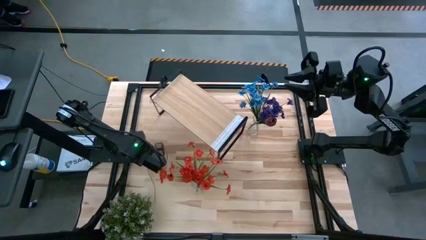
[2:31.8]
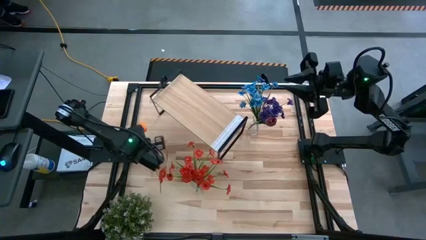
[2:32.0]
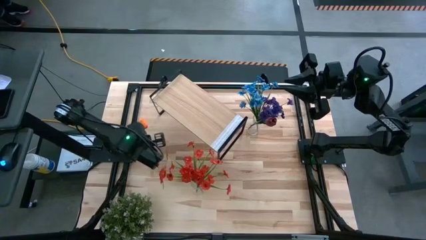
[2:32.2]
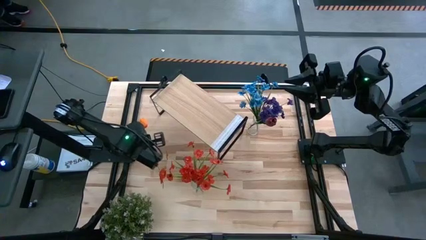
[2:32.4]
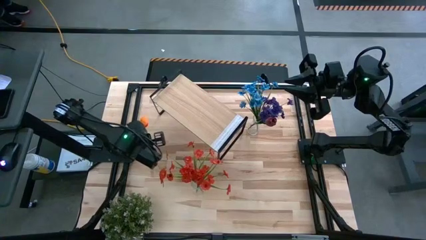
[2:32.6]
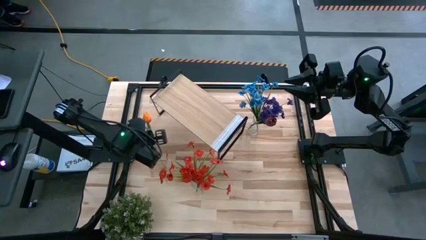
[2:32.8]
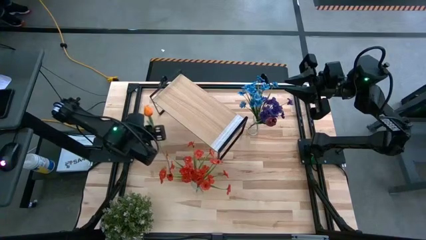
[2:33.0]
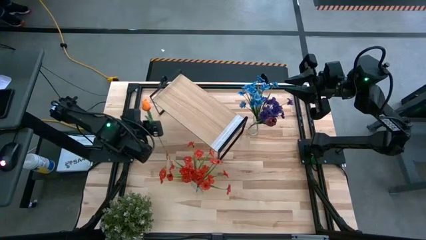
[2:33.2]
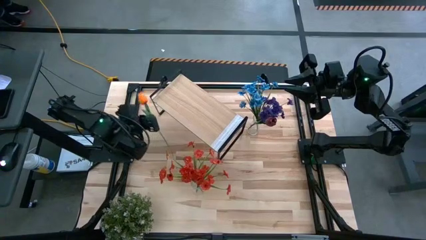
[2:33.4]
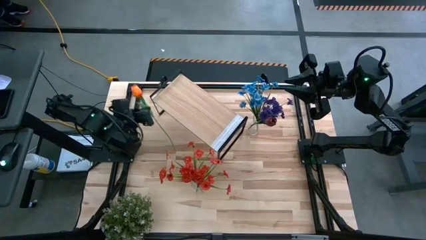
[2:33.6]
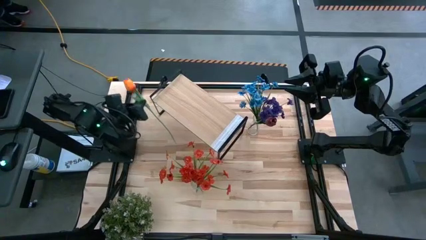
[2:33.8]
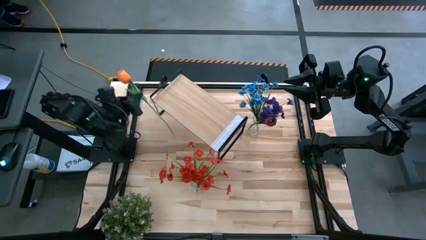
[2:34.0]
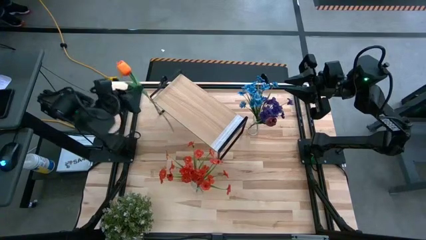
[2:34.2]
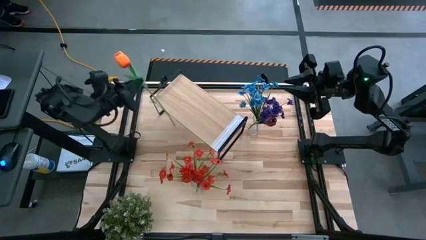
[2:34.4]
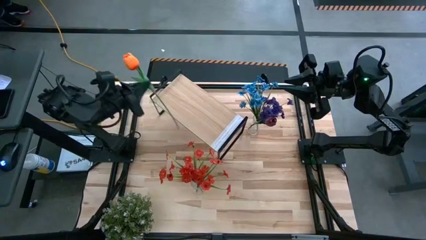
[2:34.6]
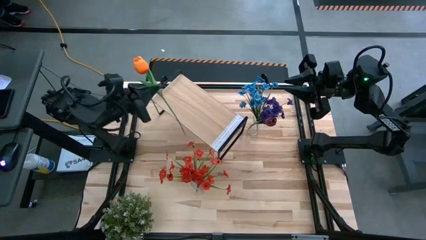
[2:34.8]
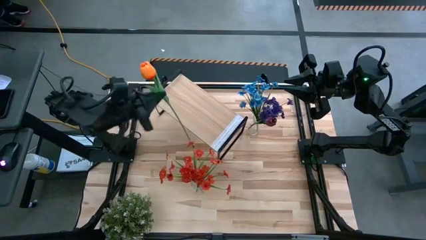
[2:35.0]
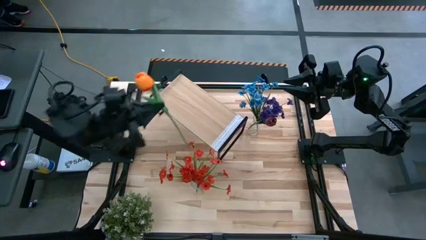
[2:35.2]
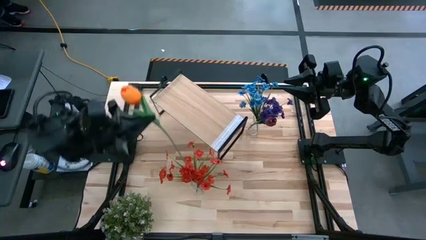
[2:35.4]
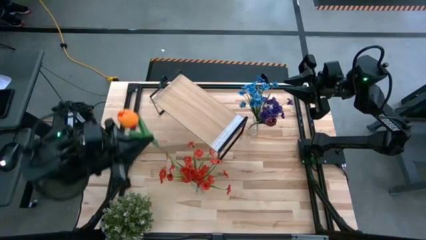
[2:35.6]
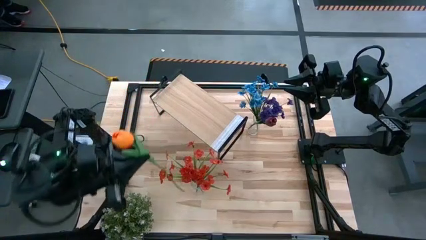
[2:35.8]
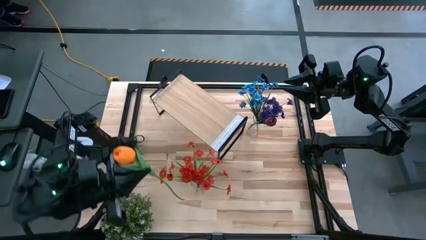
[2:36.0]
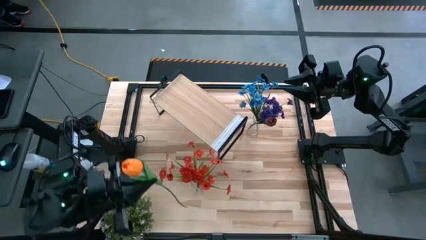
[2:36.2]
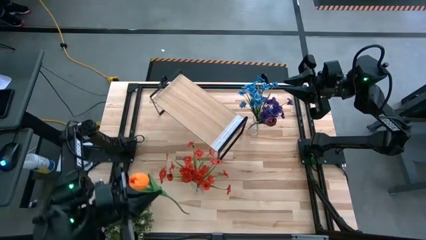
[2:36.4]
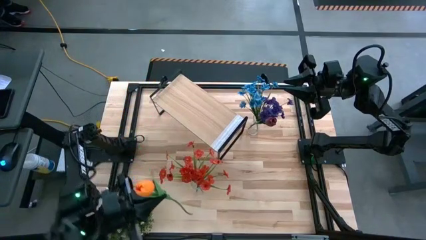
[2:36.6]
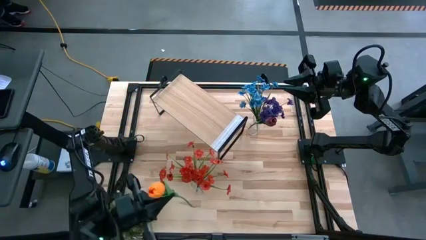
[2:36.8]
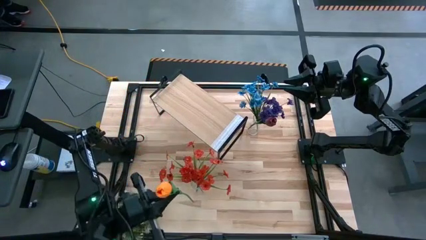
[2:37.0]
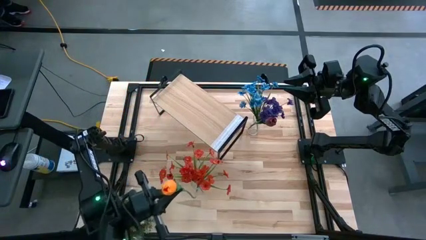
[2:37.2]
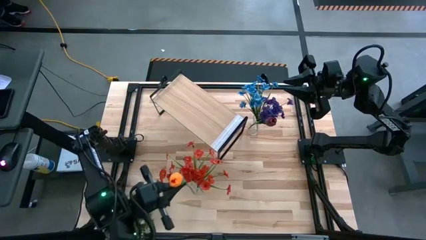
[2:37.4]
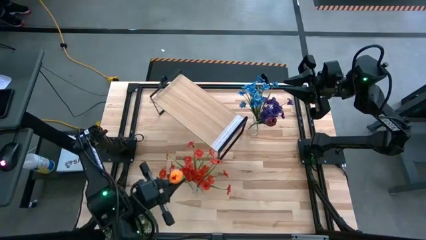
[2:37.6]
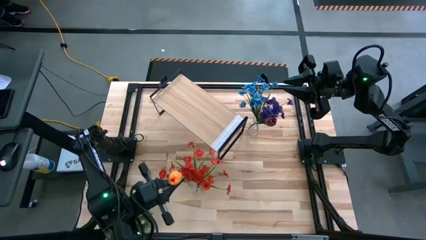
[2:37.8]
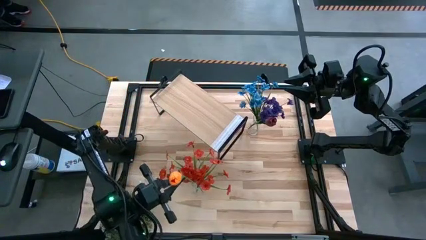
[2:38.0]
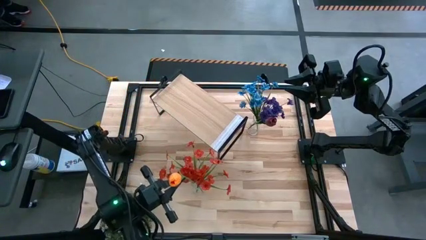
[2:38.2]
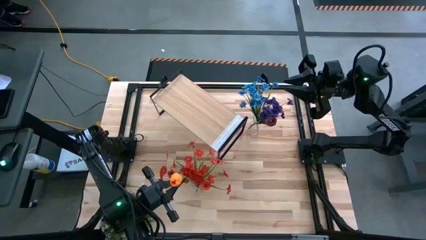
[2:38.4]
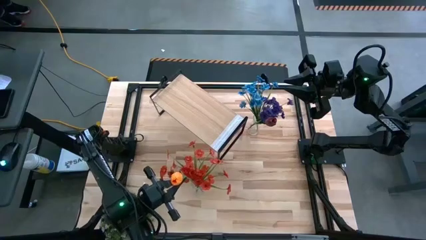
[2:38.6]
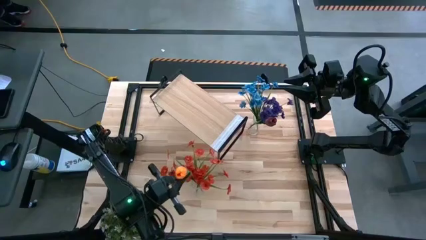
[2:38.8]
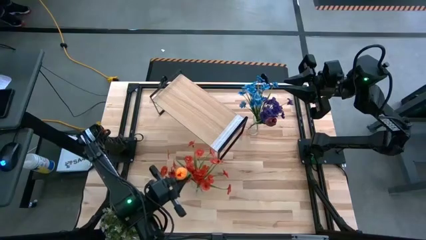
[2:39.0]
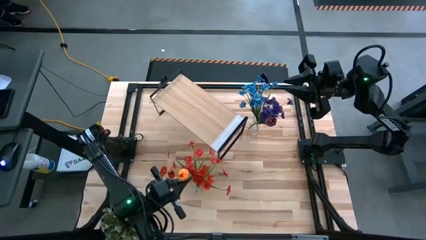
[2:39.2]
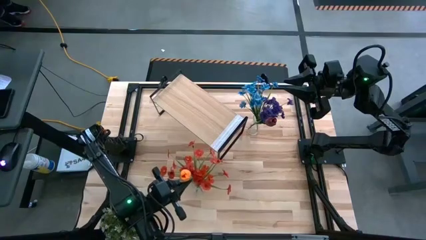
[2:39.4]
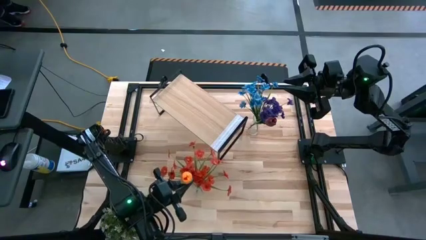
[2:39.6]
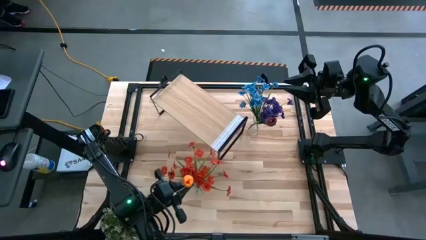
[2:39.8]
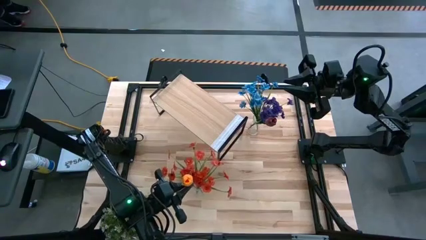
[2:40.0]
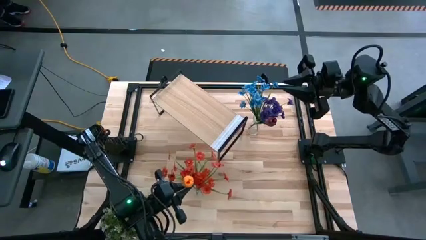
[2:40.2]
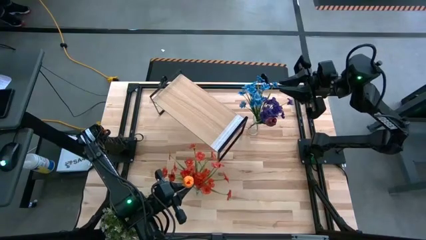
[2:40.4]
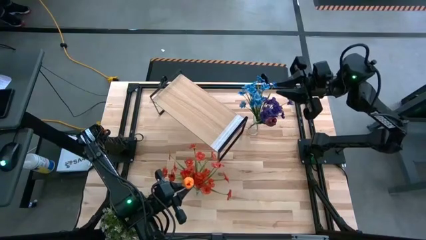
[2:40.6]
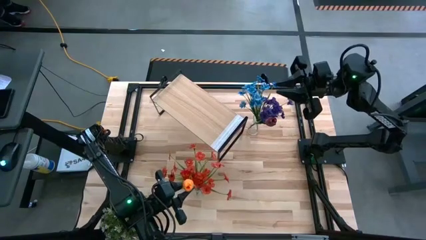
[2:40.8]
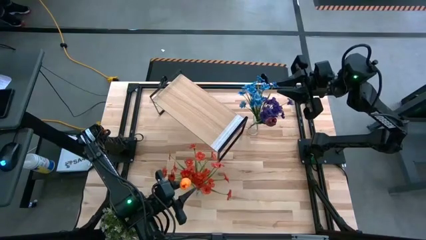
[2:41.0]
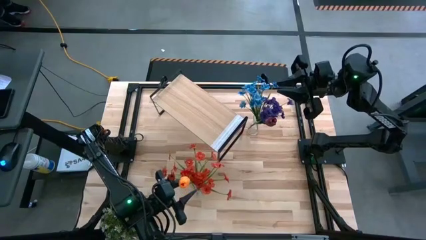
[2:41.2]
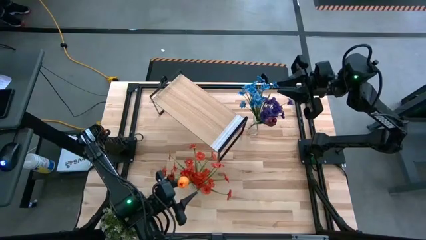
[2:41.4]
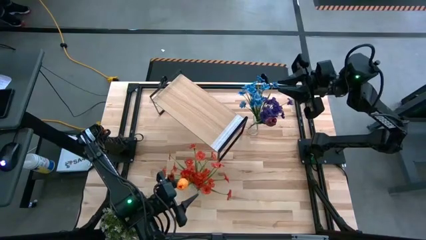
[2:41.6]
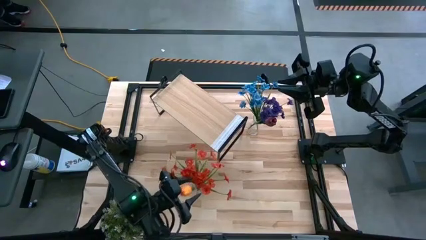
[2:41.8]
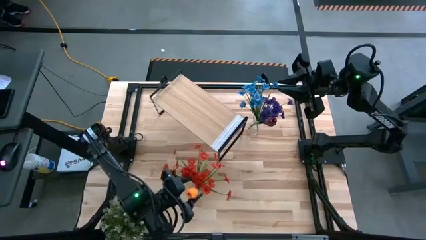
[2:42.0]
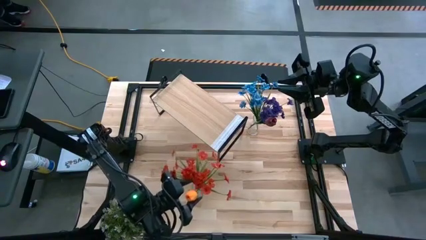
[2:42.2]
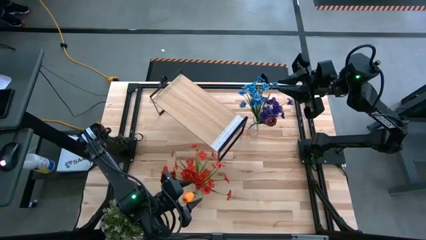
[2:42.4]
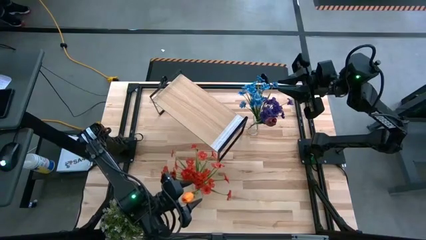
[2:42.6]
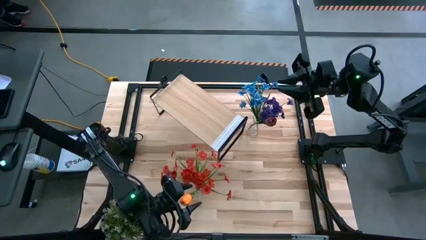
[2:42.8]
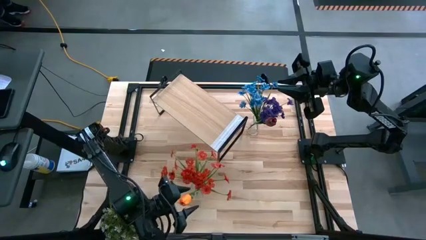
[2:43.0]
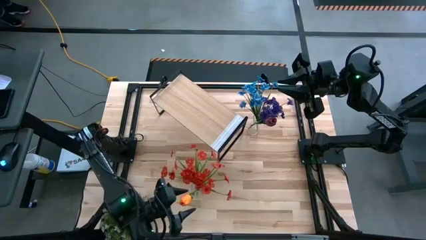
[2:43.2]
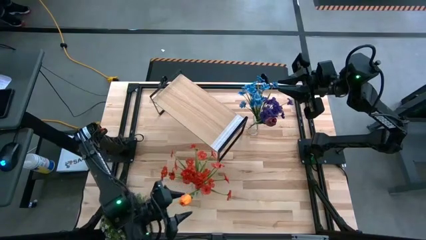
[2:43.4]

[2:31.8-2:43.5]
Task: Pick and place flowers into a vace then onto a shelf
Put the orange flower into the bottom transparent vase

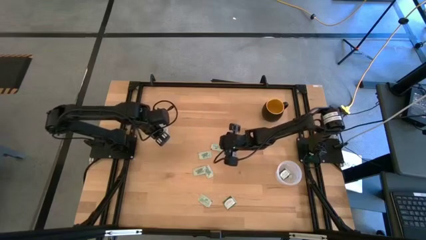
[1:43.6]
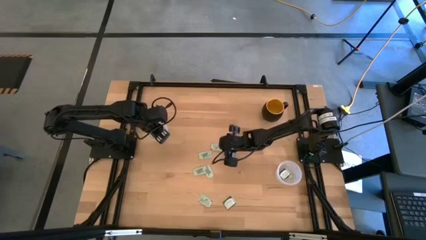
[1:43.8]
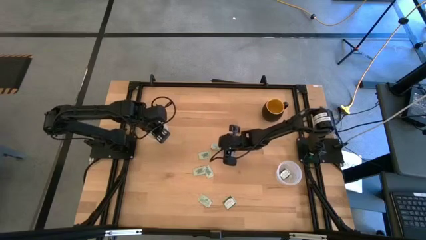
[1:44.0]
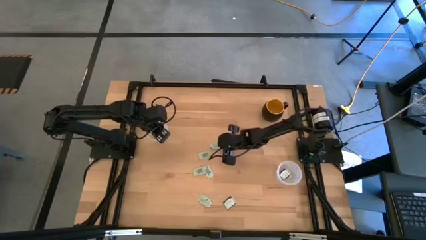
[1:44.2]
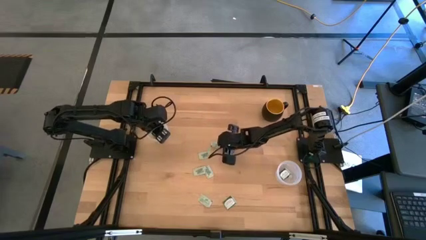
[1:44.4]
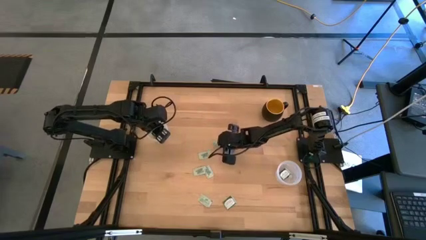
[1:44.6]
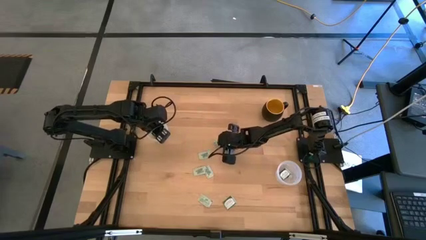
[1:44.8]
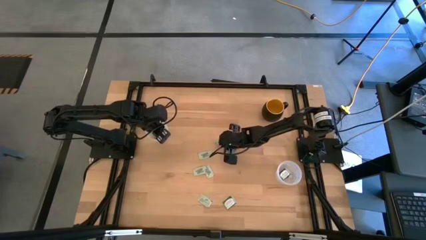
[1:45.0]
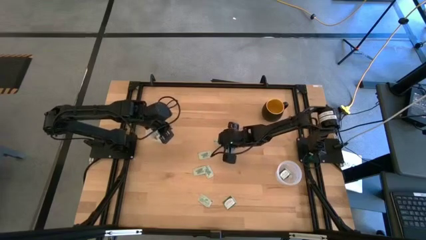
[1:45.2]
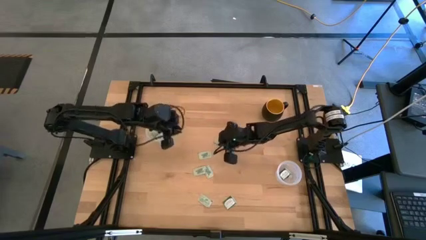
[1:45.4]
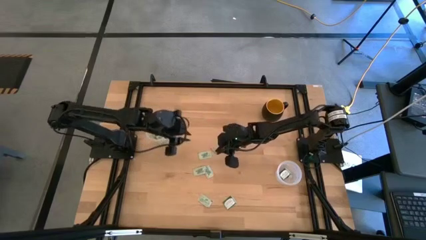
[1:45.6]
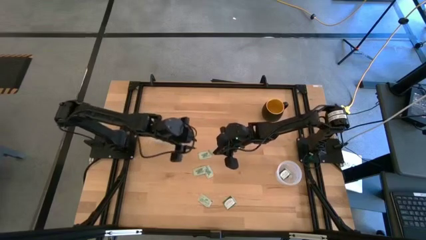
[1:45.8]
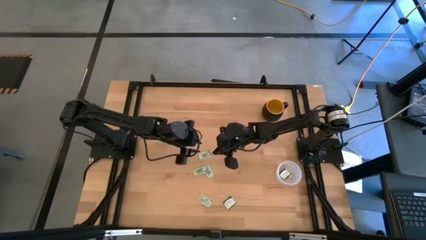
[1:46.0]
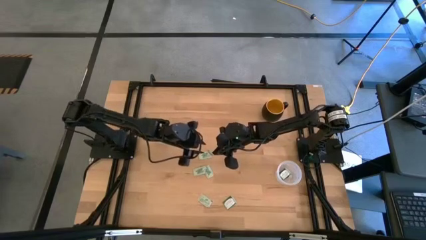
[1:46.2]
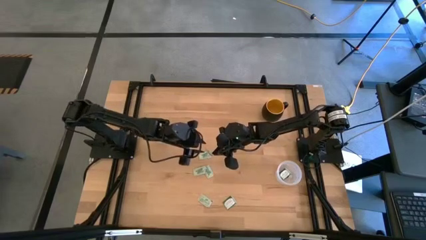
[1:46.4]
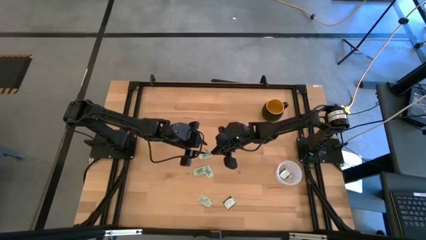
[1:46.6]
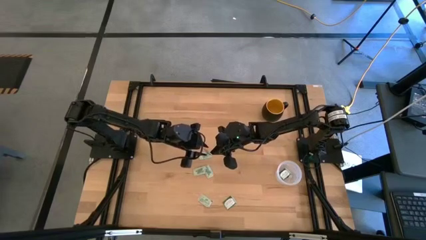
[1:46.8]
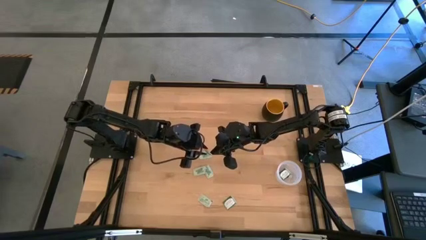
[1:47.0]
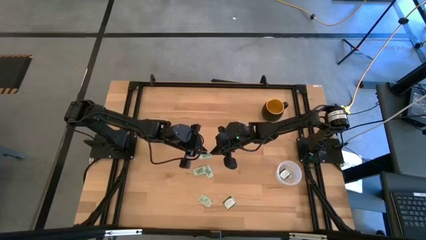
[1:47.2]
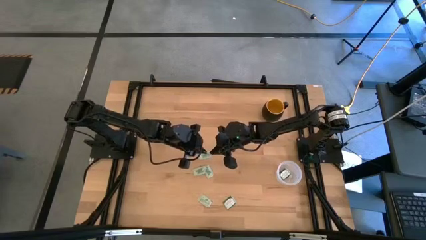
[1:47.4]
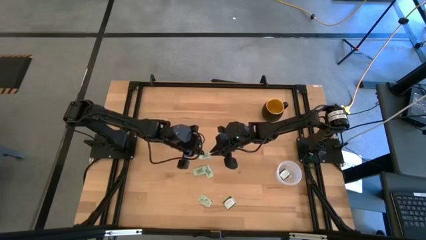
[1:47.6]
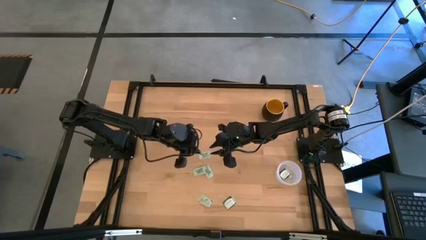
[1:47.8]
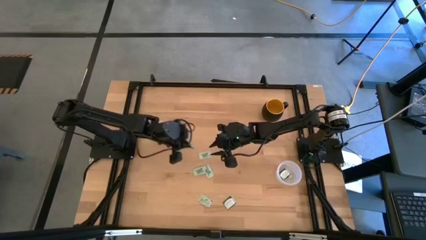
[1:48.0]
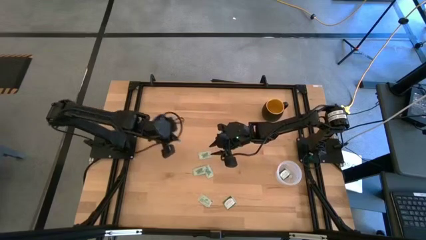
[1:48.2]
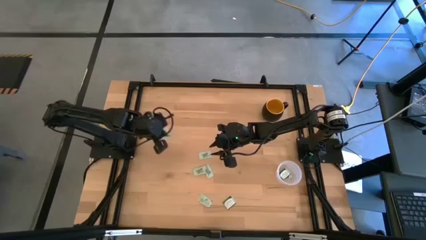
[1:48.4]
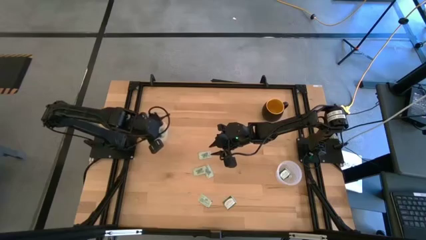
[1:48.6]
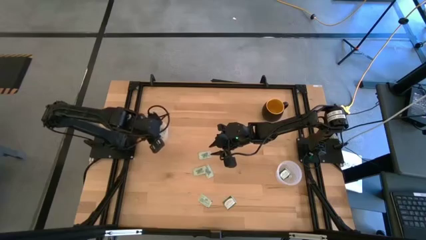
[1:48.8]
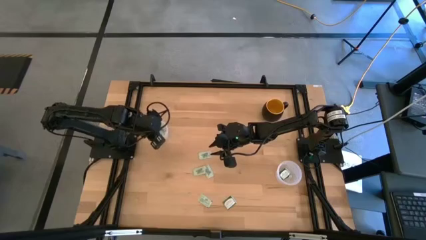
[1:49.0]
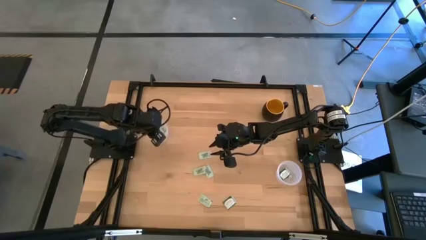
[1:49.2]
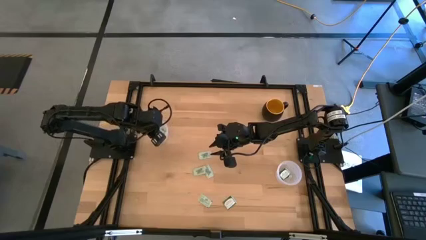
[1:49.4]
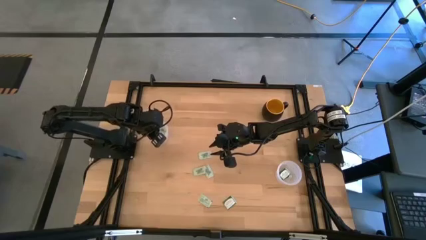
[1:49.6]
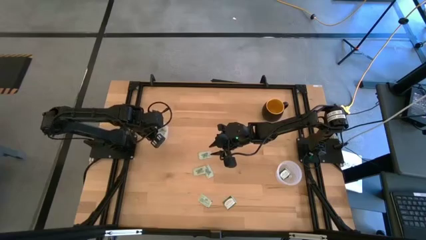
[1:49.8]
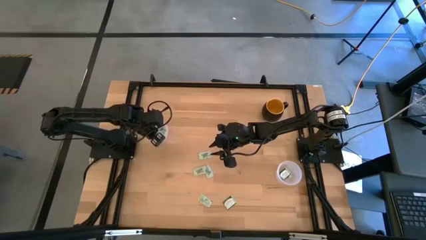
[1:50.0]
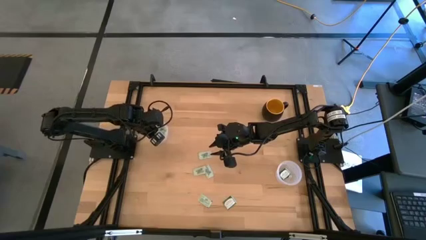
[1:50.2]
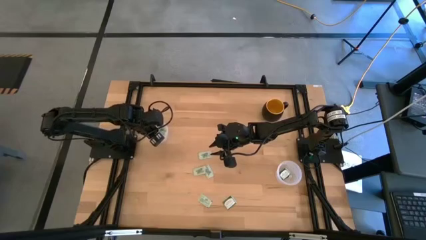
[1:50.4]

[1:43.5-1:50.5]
Task: Pick and place Stevia / Truvia into bins
Put the white stevia packet into the left transparent container
